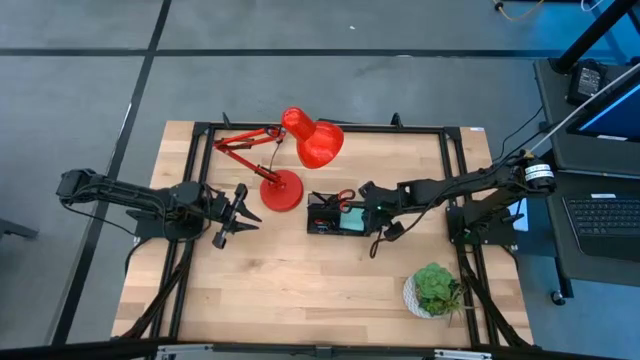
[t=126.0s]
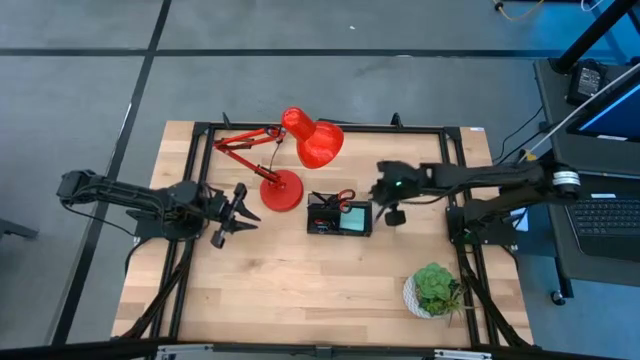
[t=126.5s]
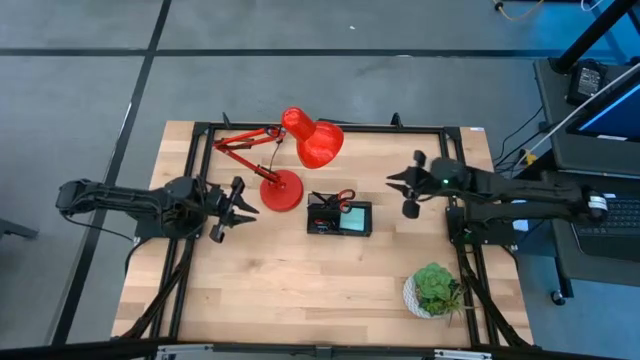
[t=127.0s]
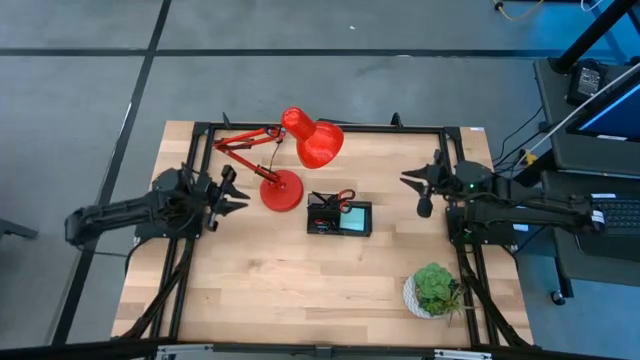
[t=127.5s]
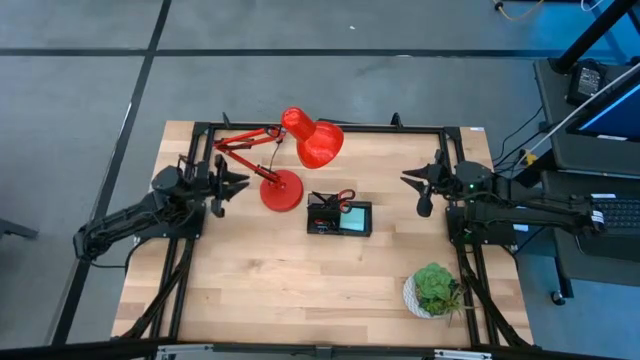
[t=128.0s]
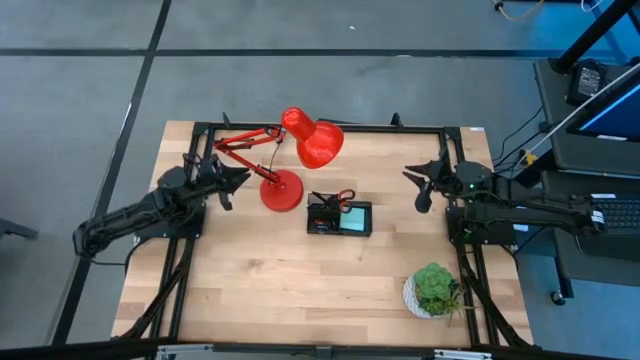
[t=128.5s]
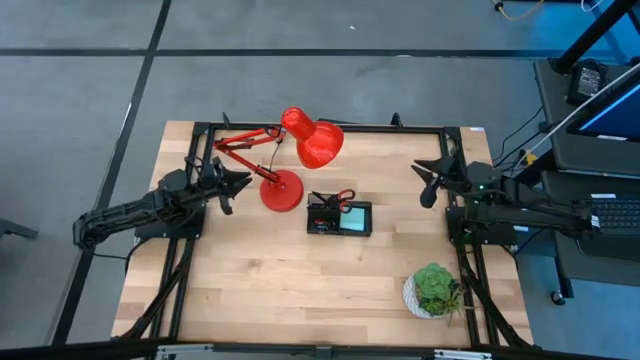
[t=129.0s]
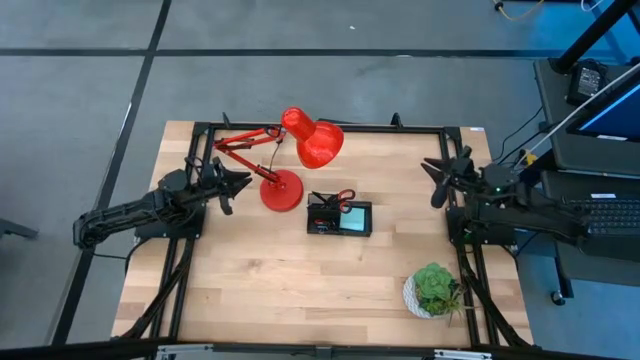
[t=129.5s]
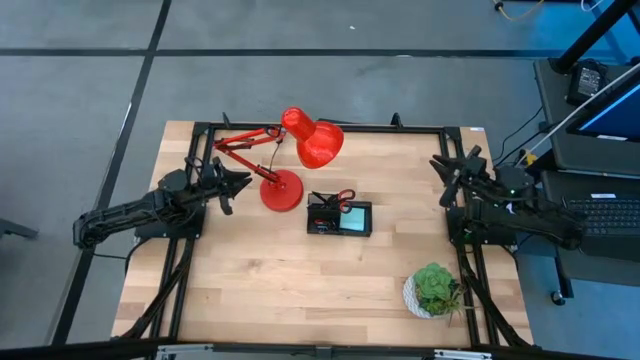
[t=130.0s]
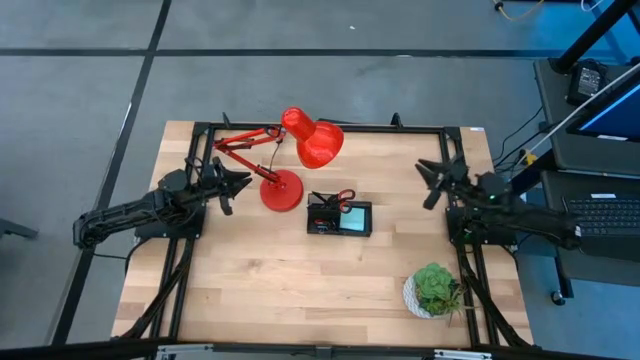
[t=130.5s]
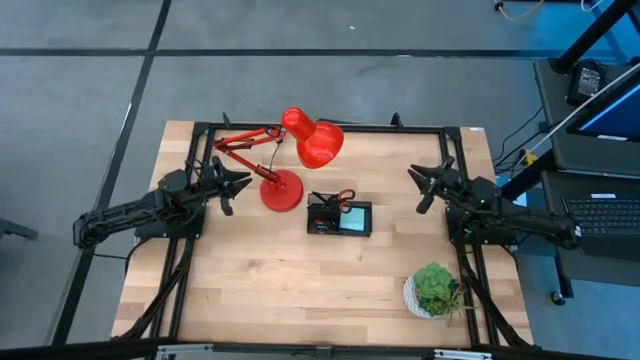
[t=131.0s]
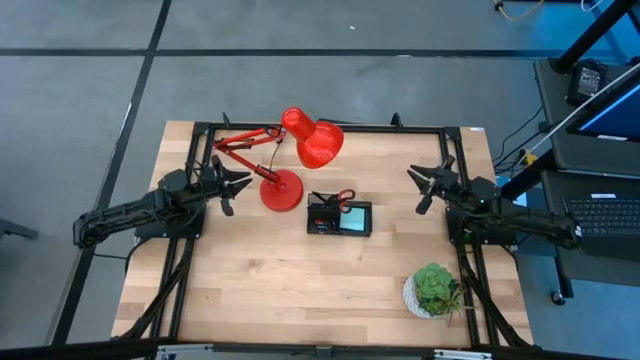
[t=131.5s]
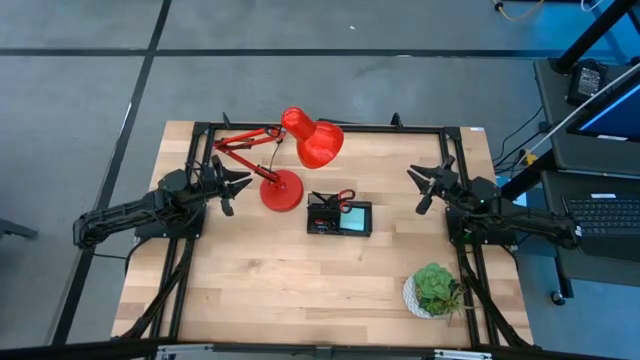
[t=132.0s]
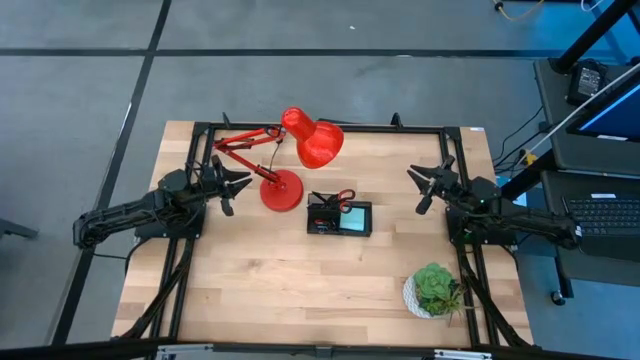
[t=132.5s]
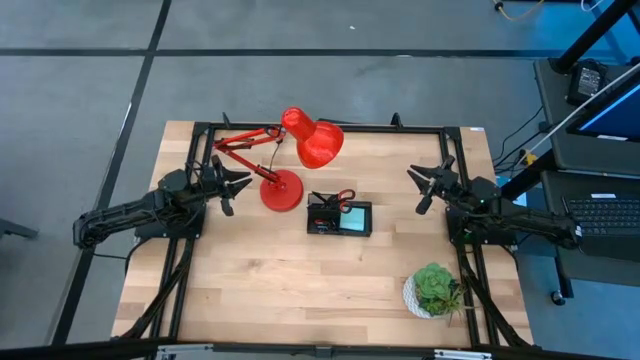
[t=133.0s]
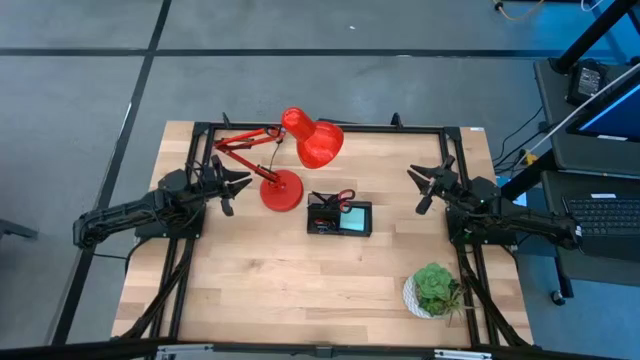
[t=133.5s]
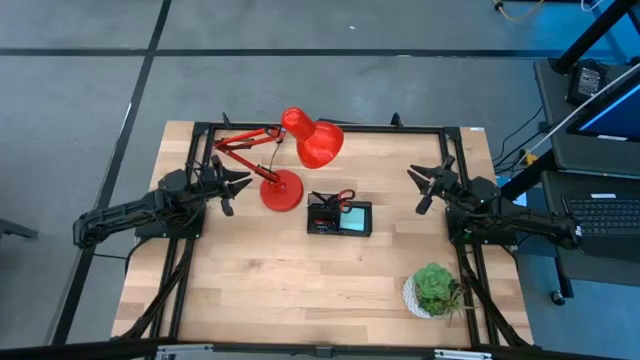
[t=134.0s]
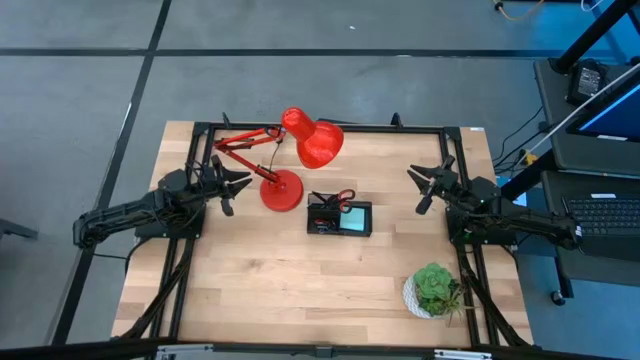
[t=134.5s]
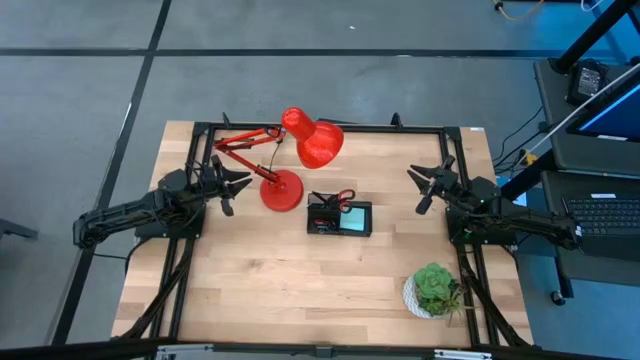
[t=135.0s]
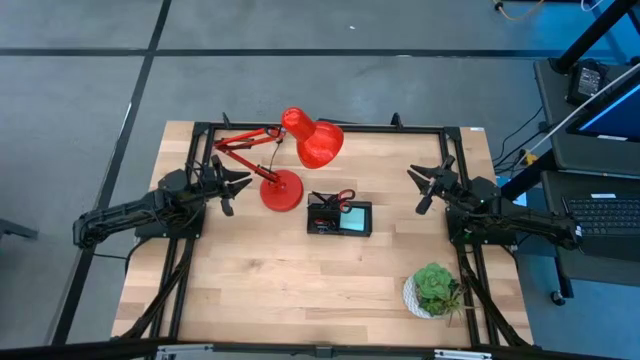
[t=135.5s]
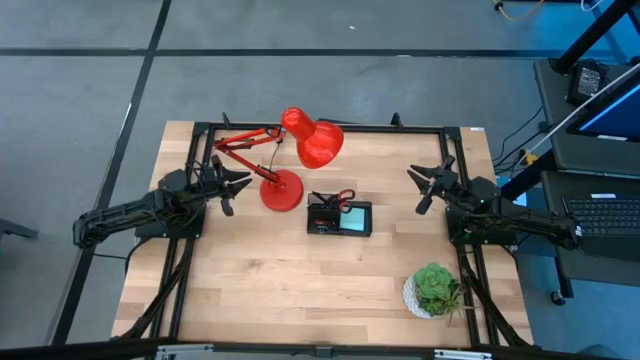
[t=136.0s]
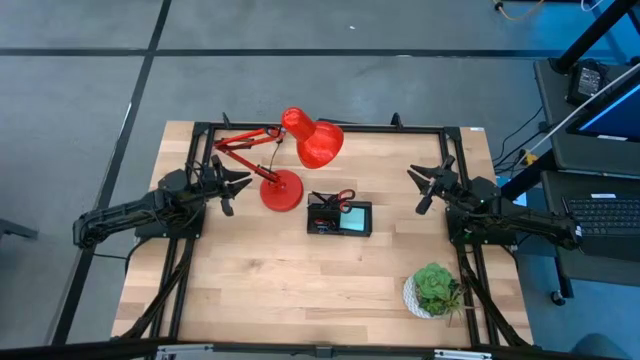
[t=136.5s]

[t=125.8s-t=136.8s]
Task: Pick and place office supplies into organizer
Return to Home Position

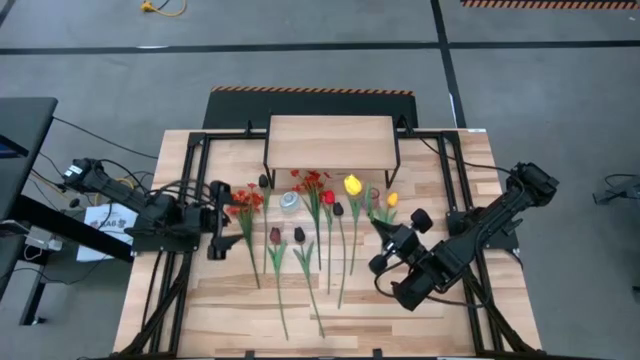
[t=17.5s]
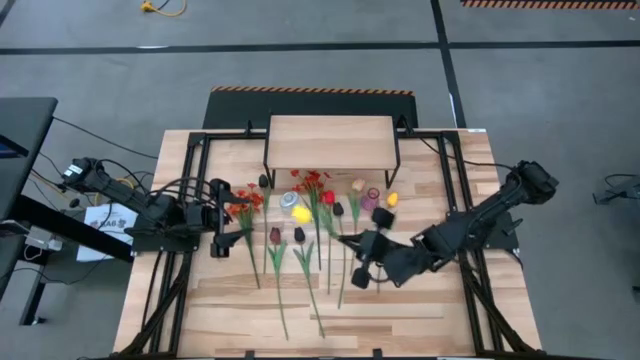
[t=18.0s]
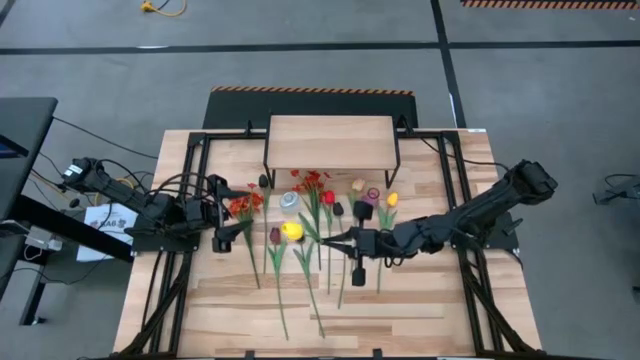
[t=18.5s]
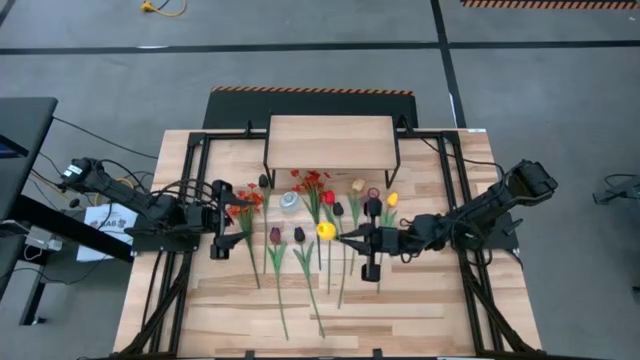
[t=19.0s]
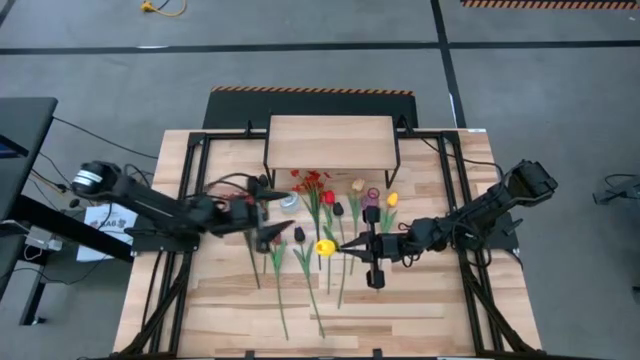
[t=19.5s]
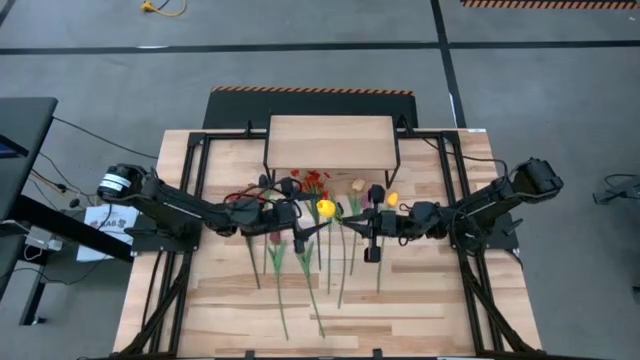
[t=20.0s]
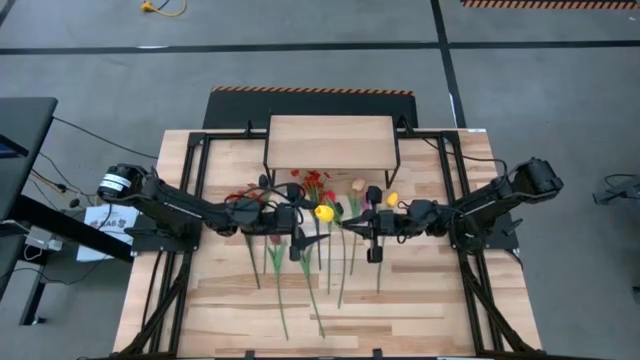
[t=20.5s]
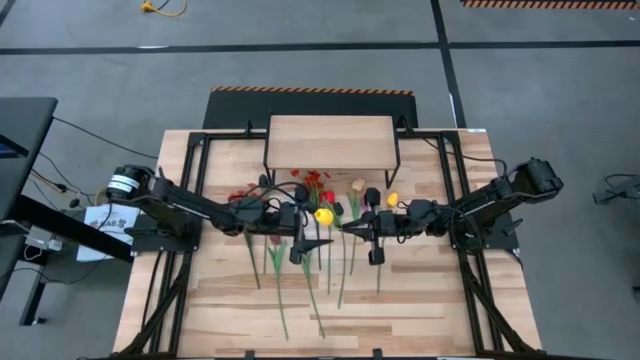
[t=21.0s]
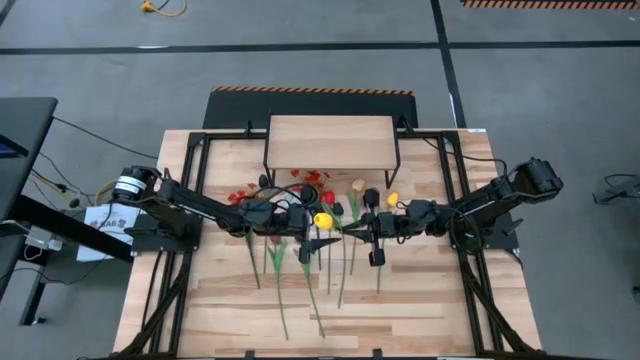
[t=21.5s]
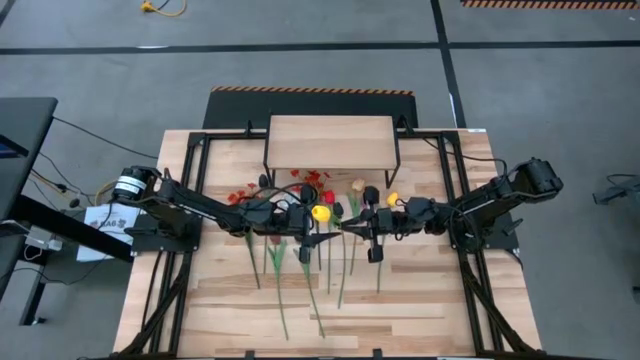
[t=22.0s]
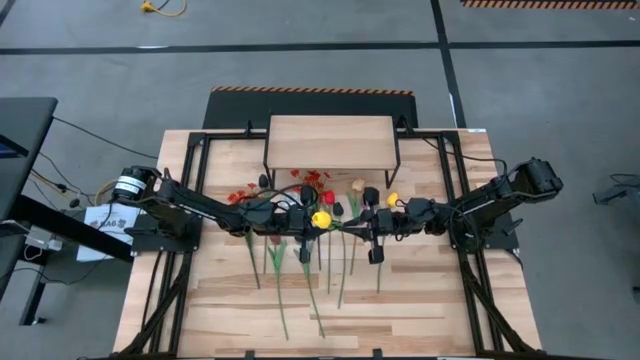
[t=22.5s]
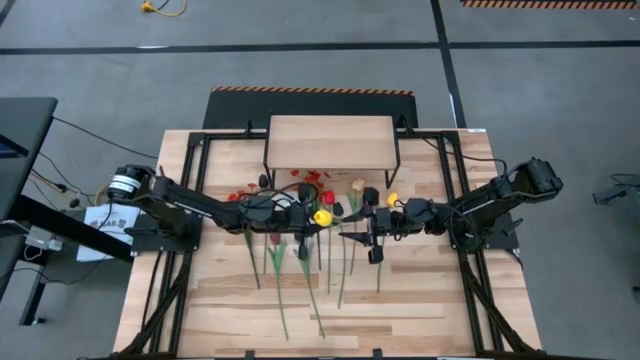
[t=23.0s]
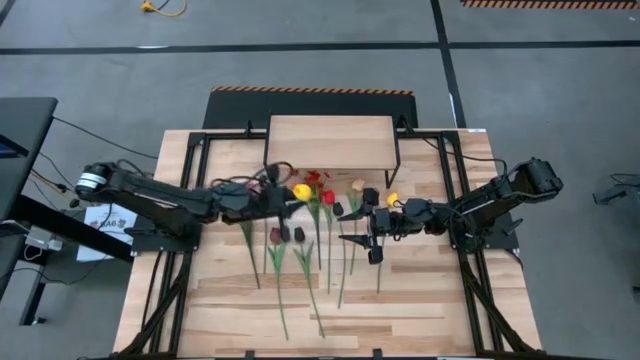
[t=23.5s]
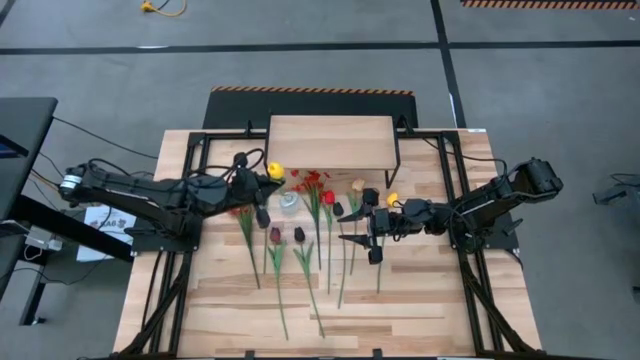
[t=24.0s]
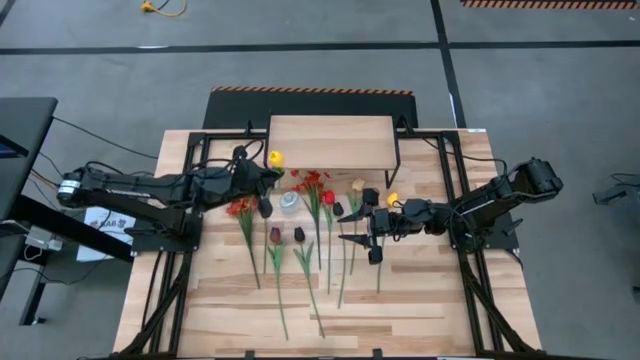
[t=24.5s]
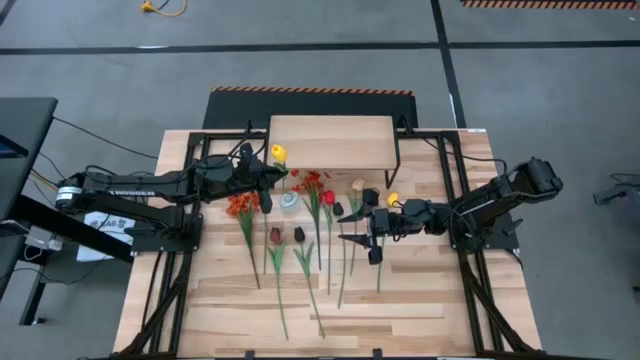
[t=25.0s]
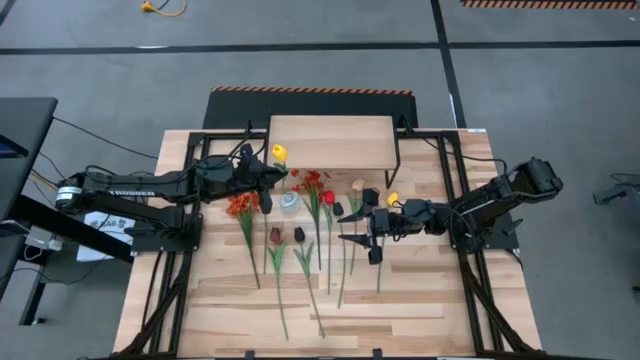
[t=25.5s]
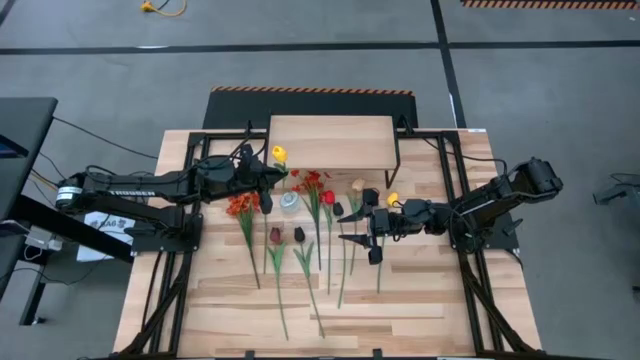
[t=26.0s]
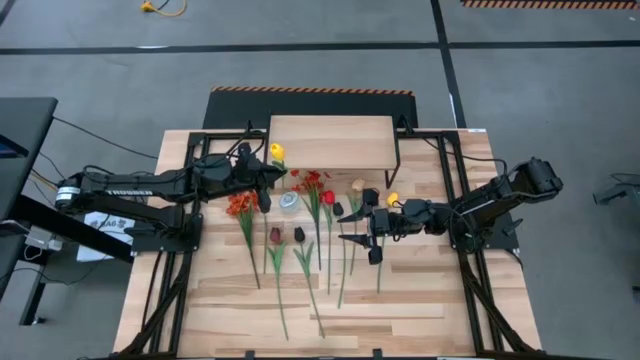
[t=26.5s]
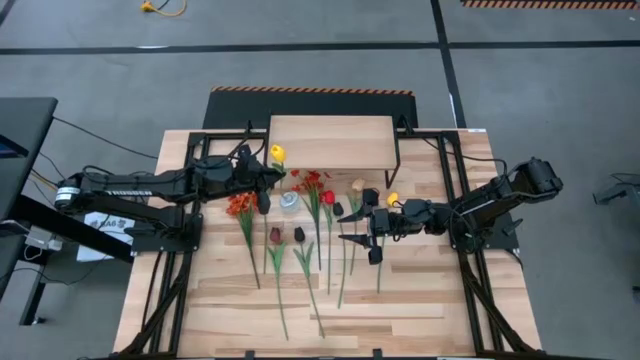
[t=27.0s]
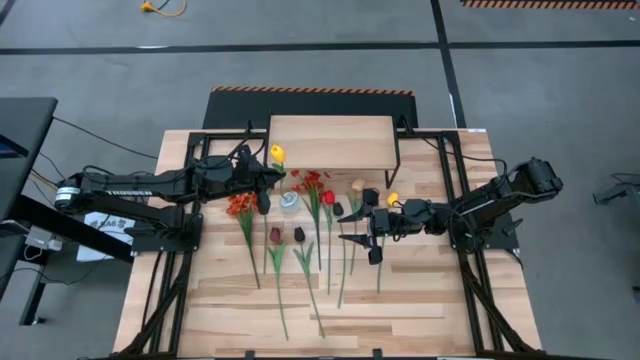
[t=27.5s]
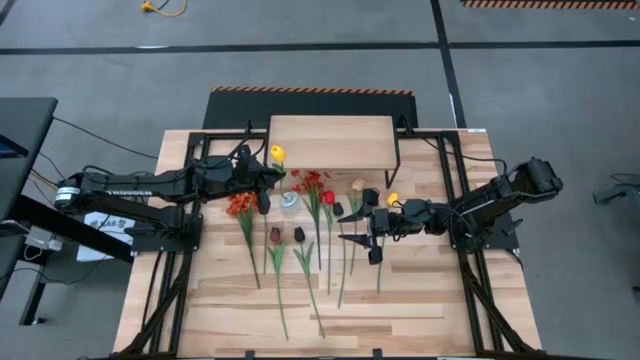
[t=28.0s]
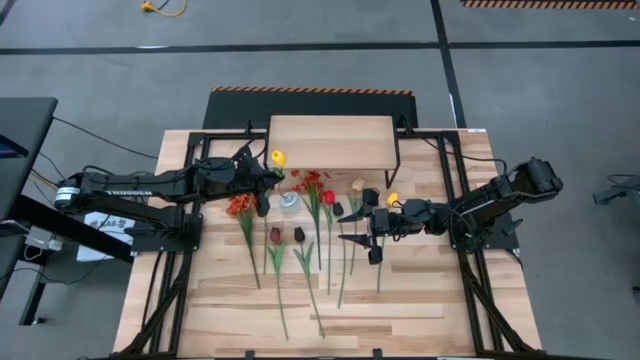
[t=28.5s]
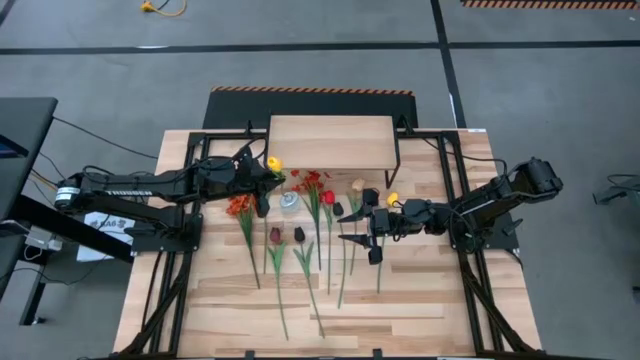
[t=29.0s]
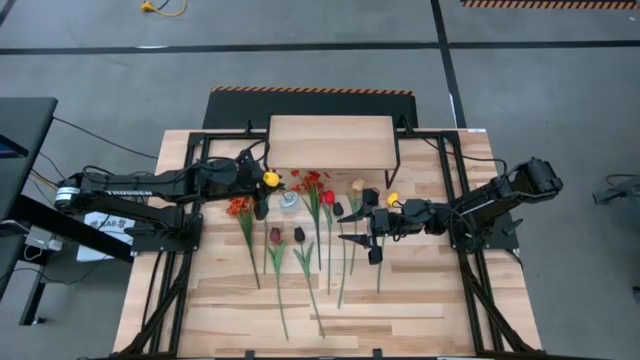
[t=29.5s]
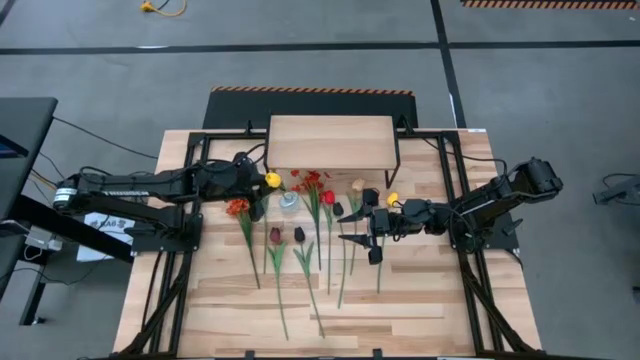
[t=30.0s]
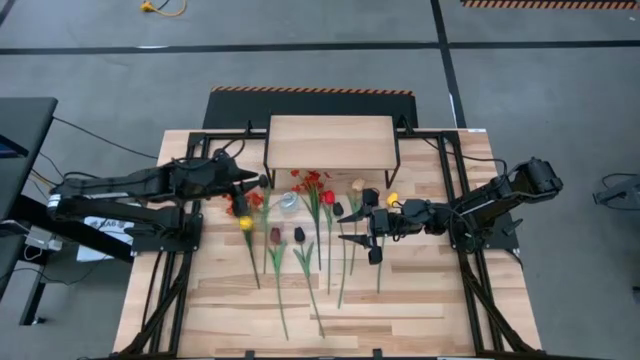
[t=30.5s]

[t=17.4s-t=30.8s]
Task: Pick and place flowers into a vace then onto a shelf
Put the right yellow flower into the transparent vase
